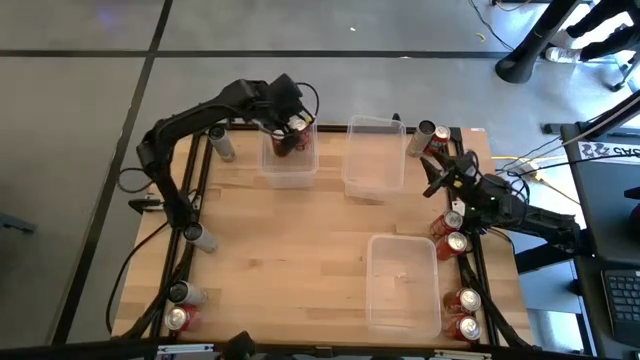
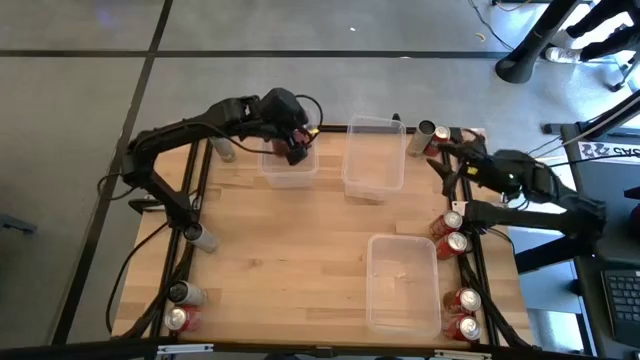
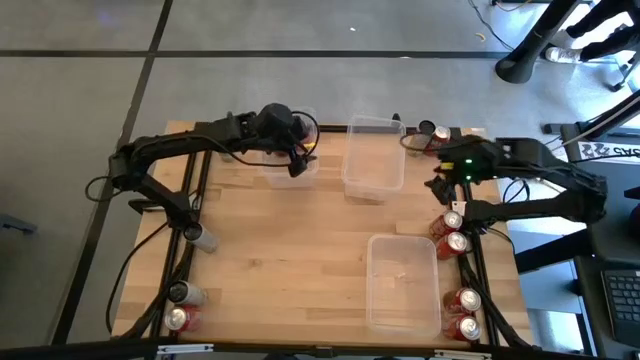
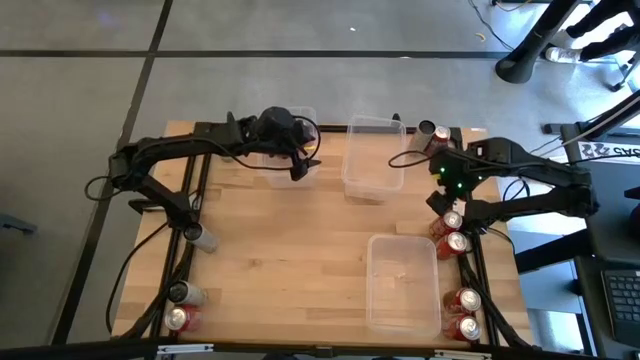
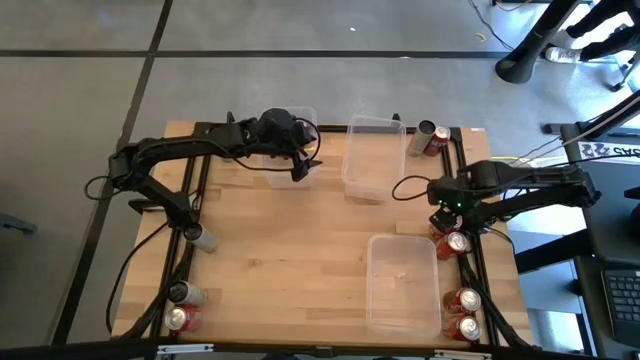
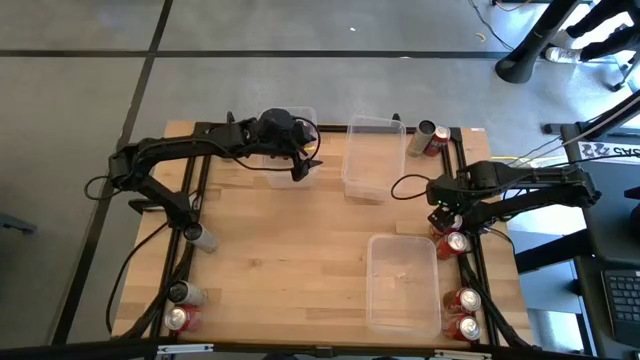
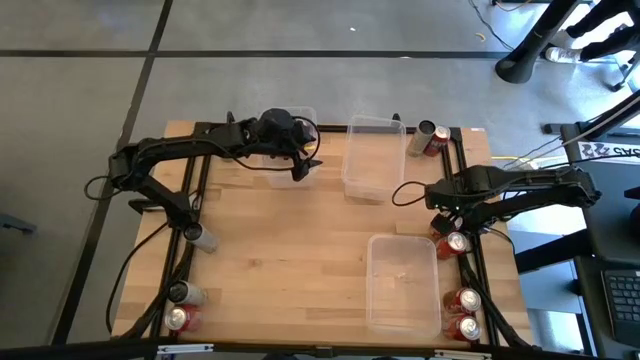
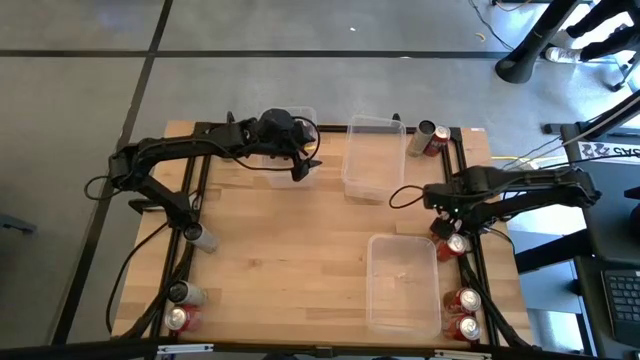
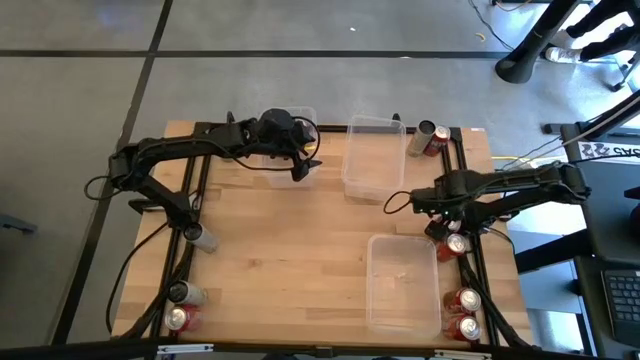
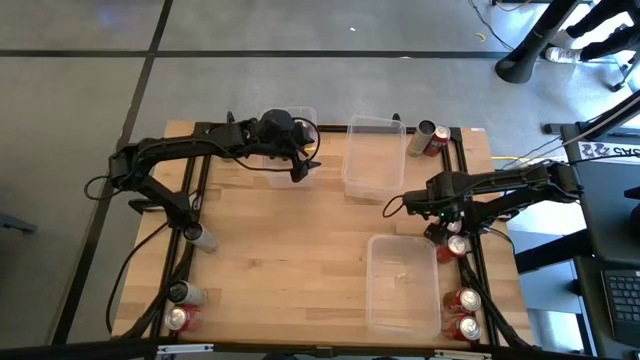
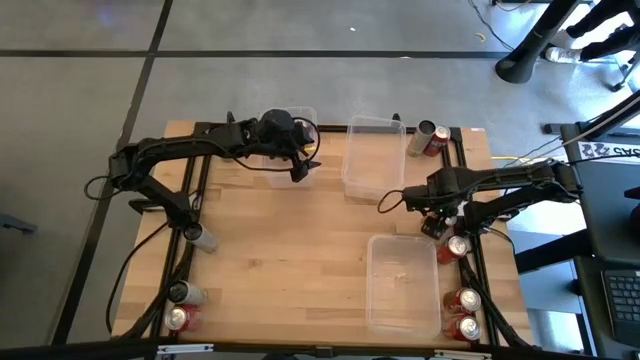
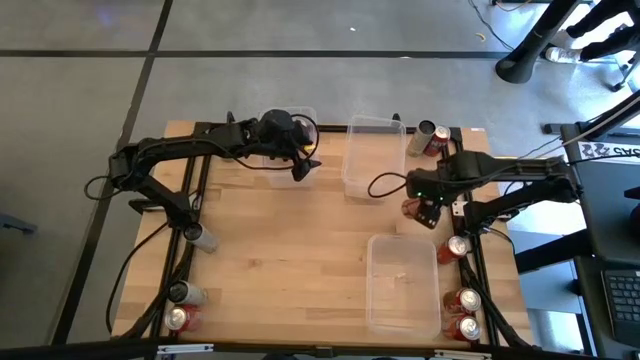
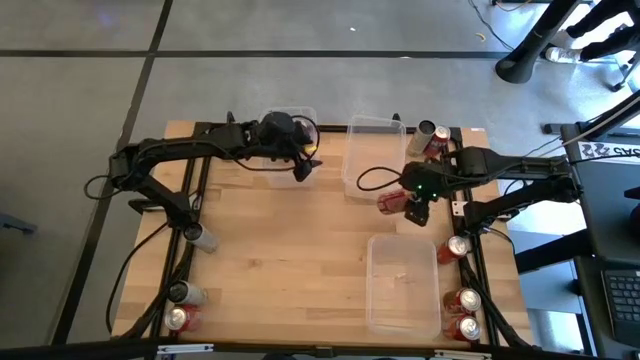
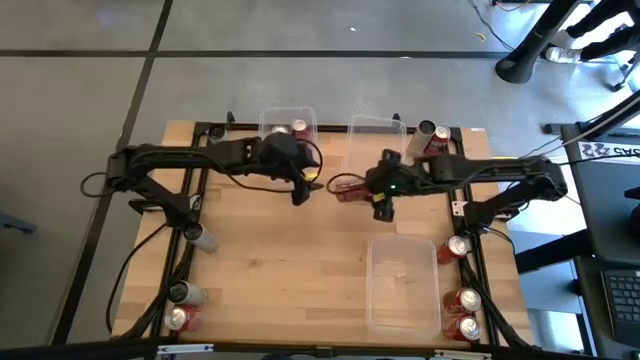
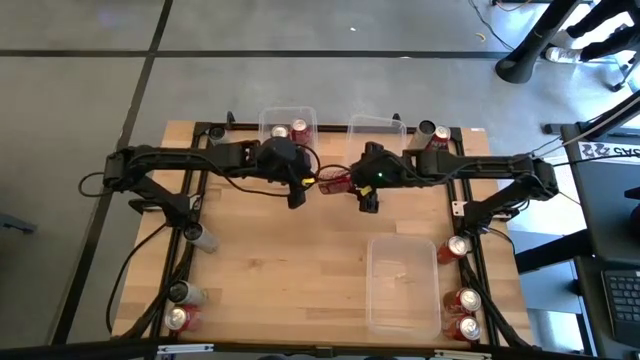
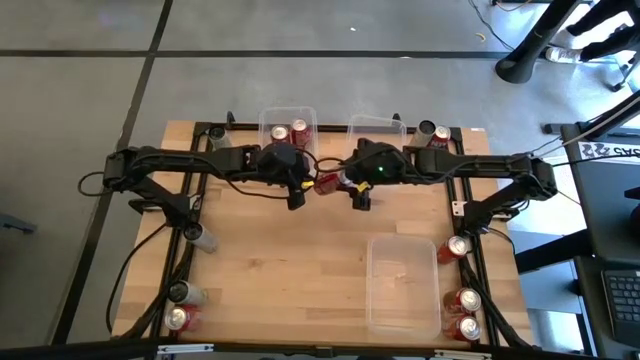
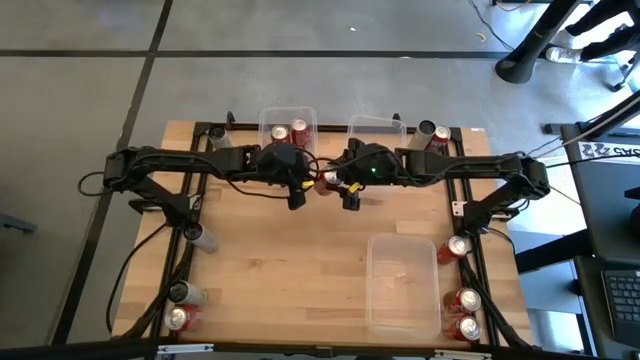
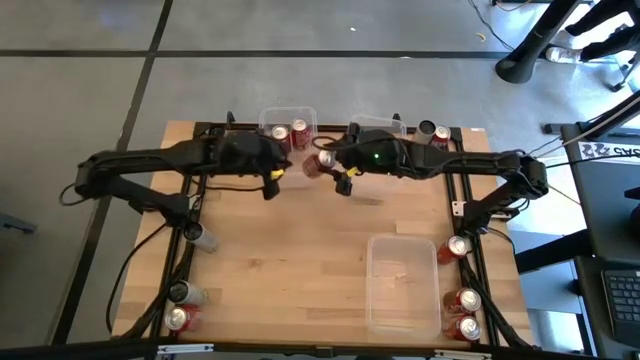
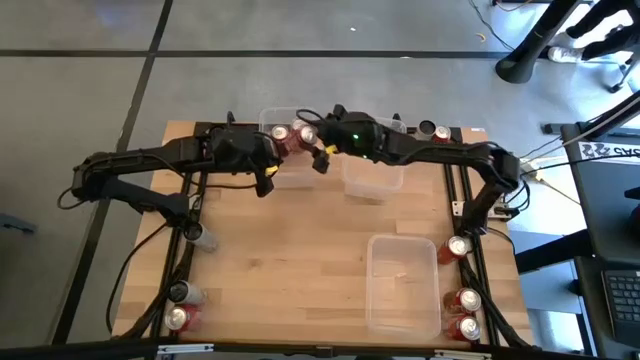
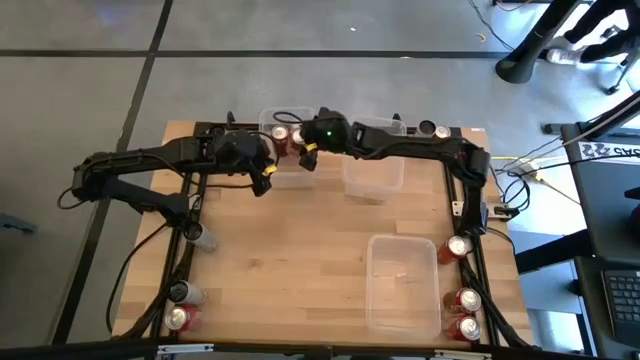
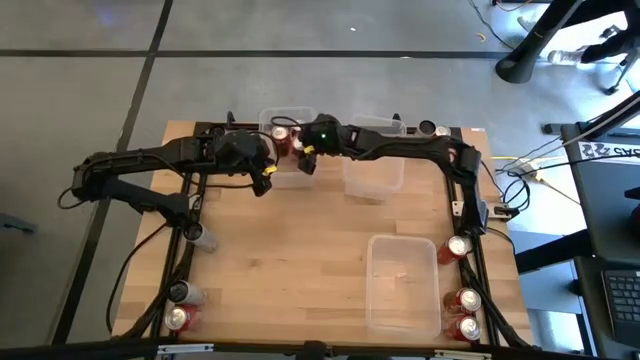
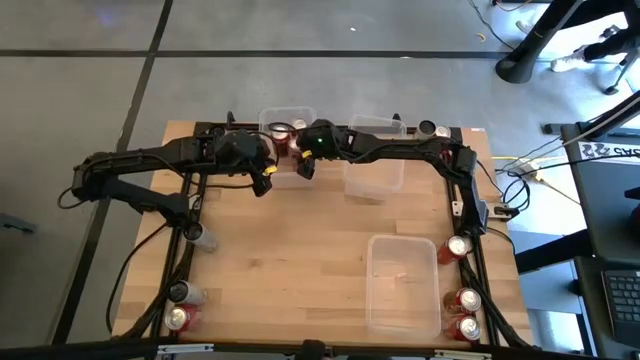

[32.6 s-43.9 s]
Task: Sort soda cans
Put the top red soda can into the top left transparent bin aligned with the other red soda can

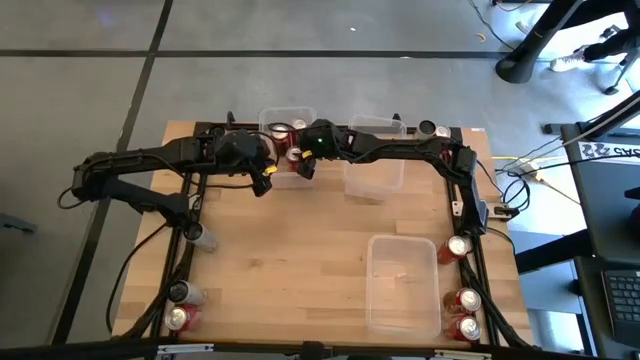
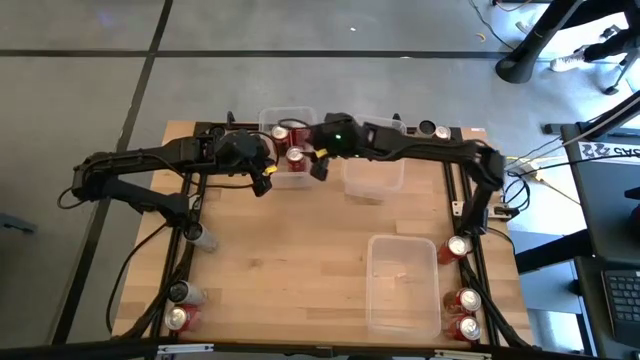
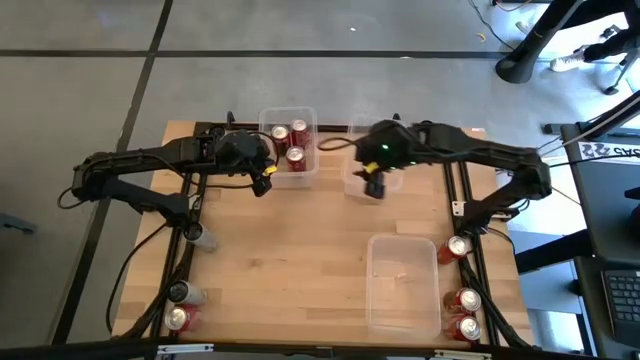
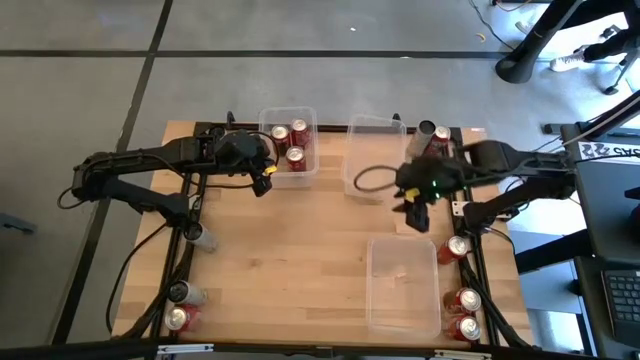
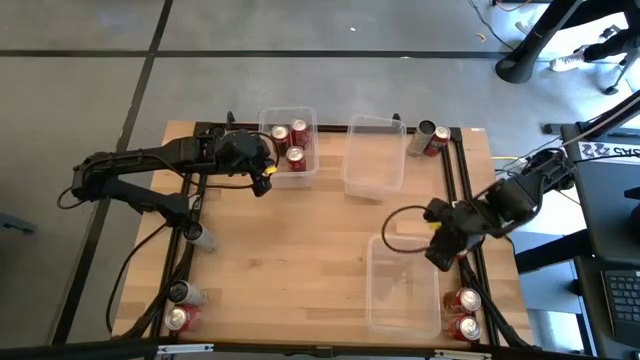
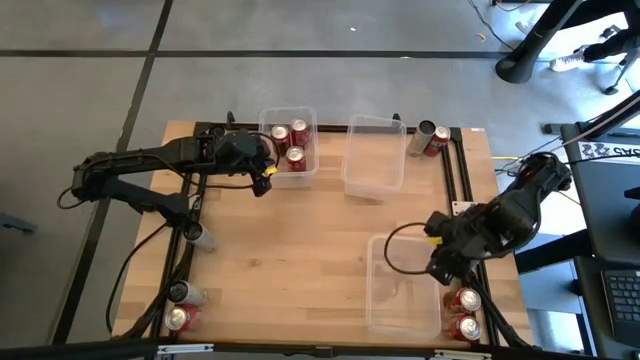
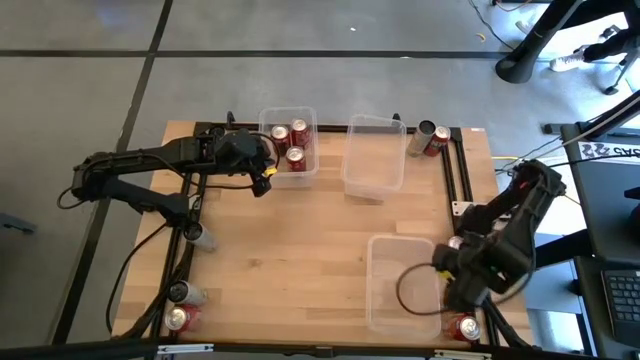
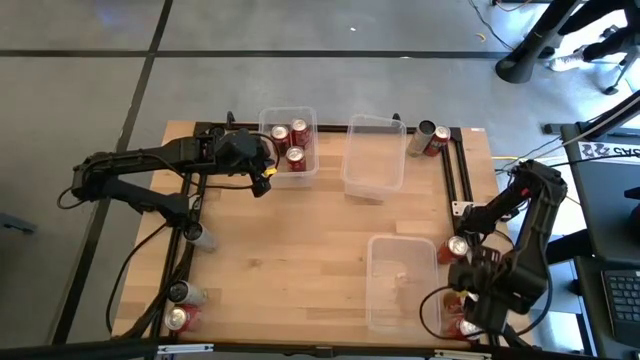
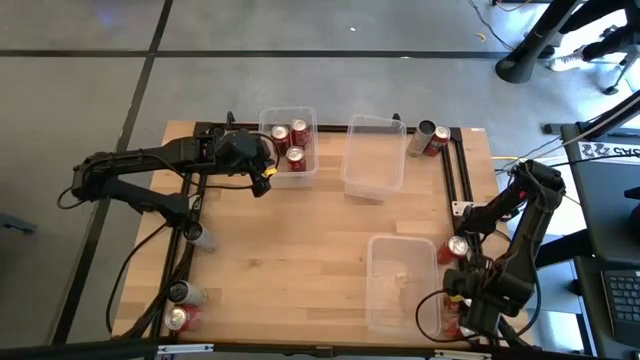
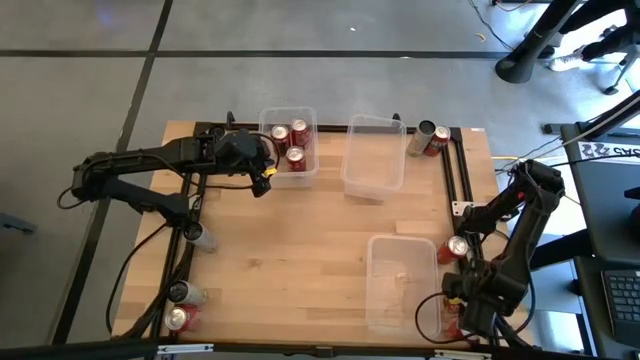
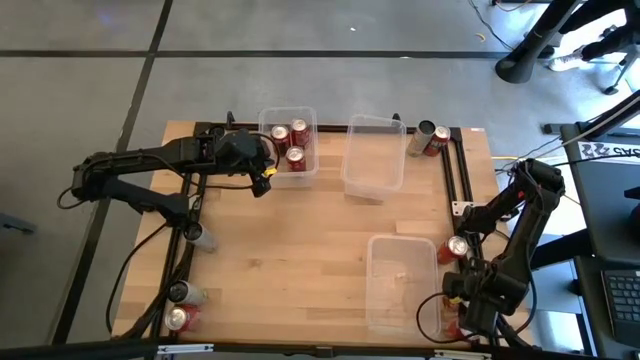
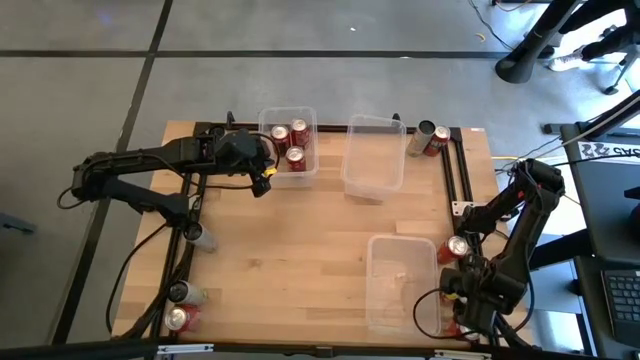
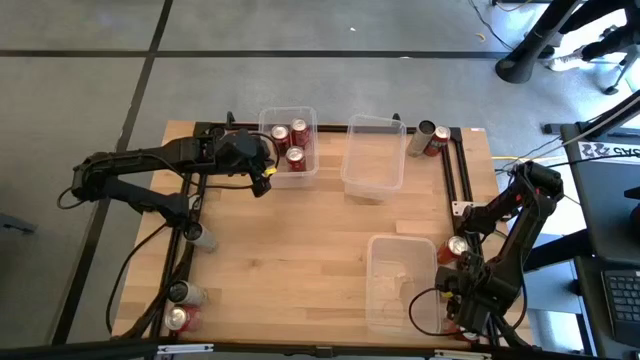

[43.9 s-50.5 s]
Put the red soda can into the top left transparent bin aligned with the other red soda cans

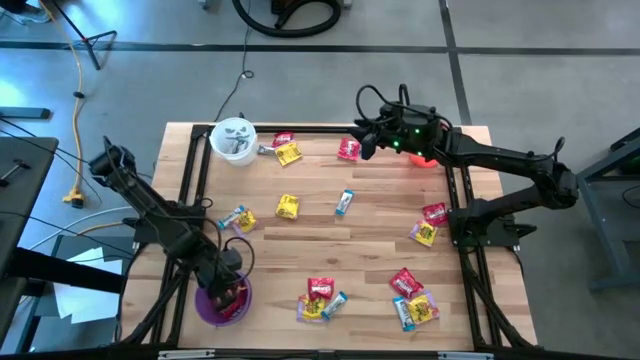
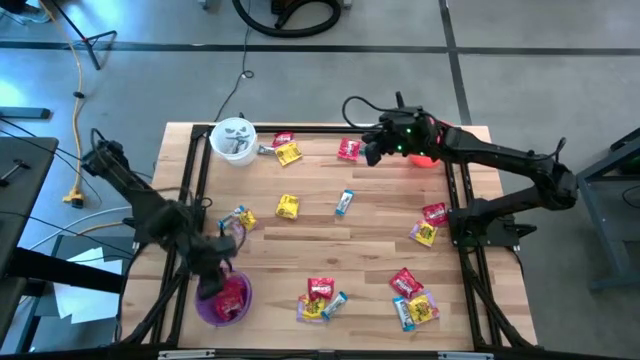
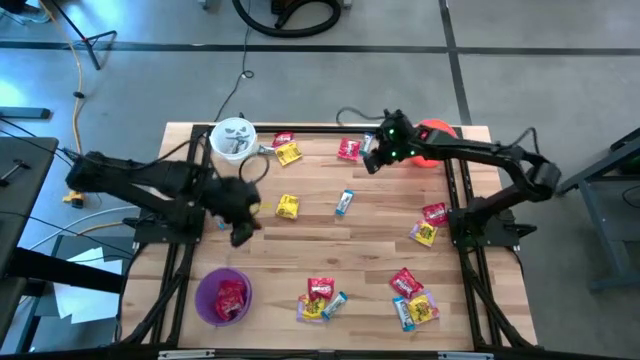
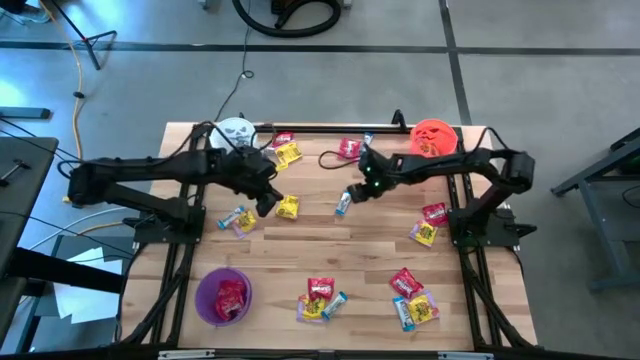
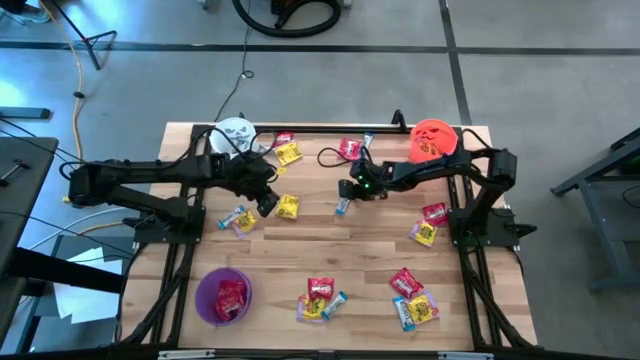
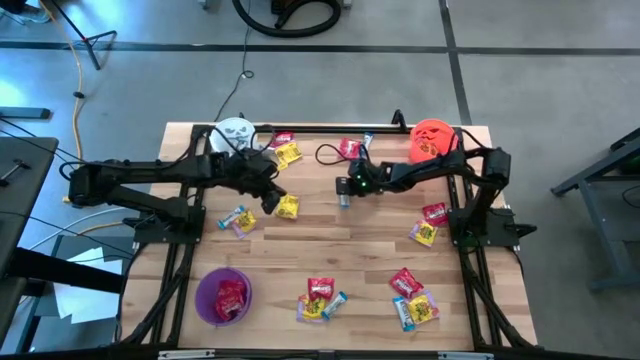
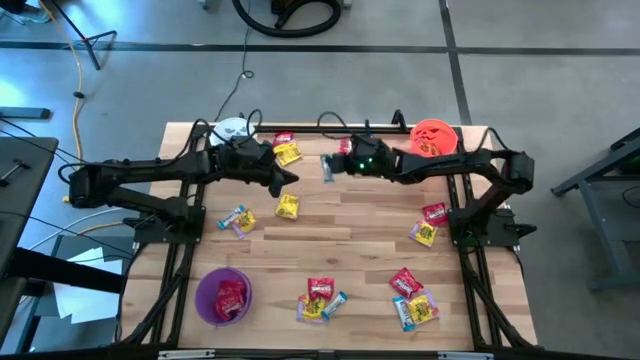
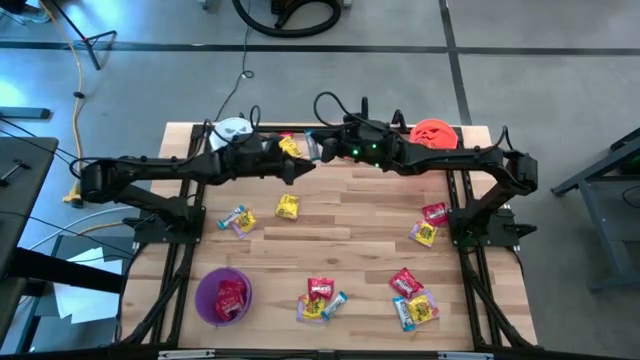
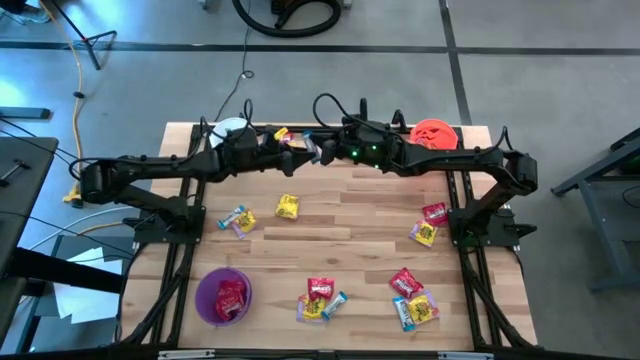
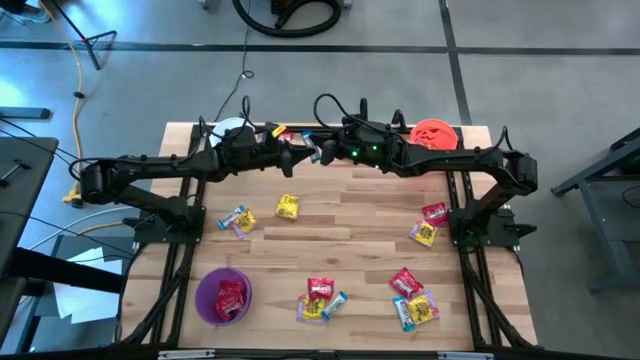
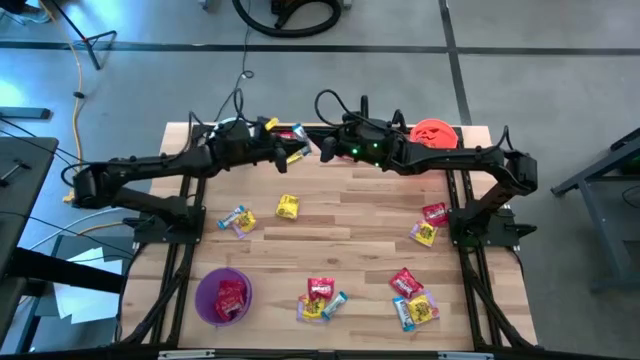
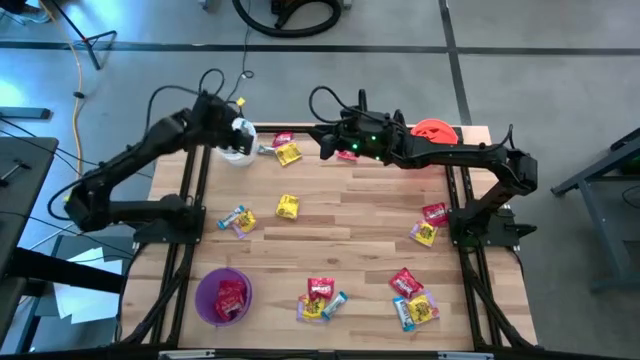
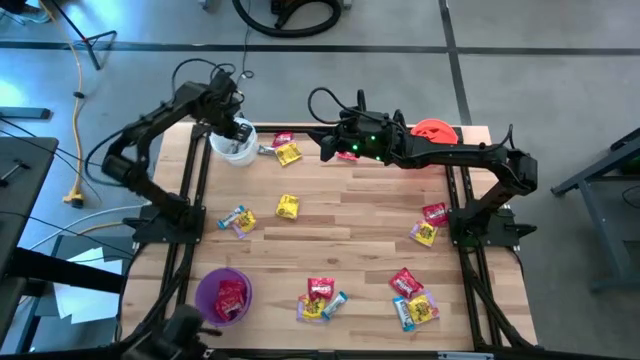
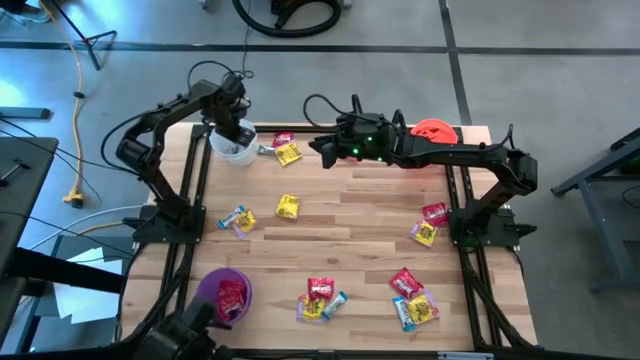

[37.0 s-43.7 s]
Task: Sort candy
Put the white candy into the white bucket
